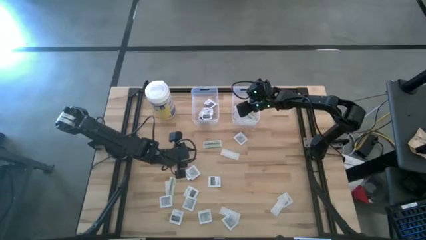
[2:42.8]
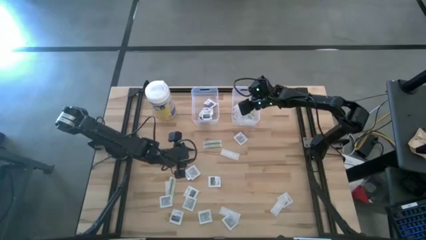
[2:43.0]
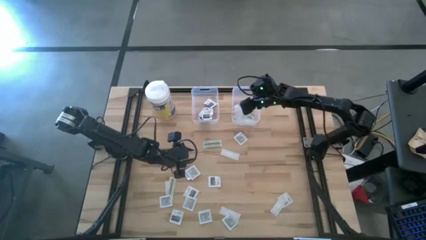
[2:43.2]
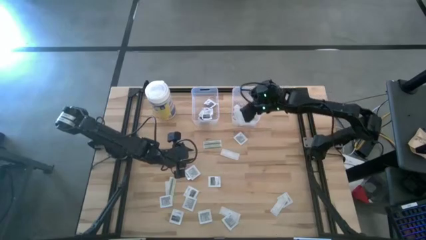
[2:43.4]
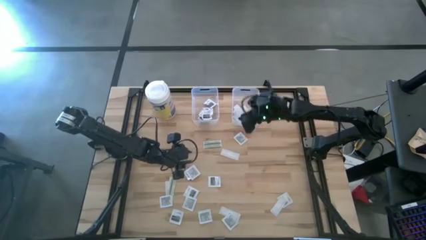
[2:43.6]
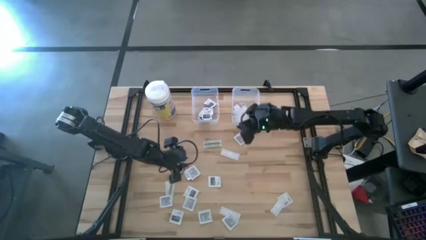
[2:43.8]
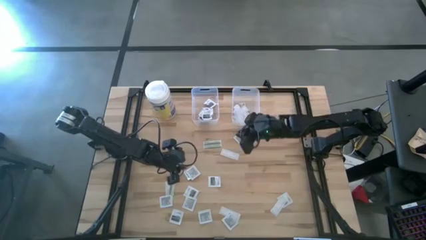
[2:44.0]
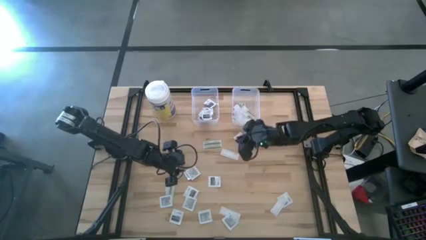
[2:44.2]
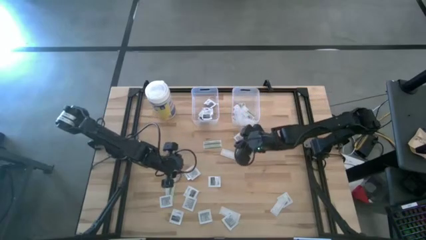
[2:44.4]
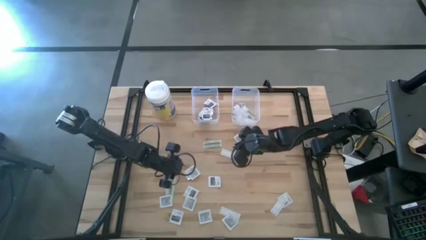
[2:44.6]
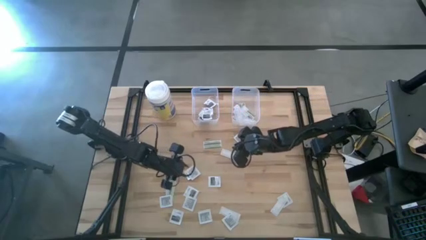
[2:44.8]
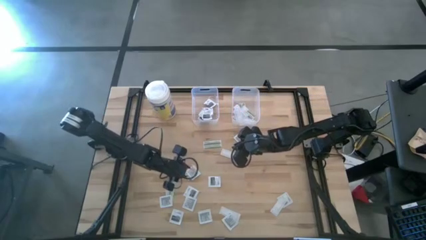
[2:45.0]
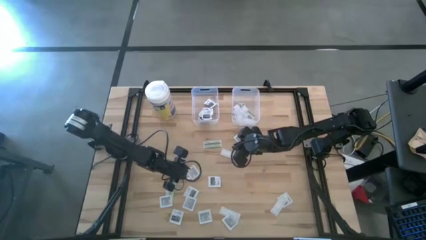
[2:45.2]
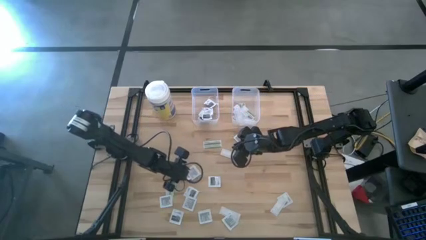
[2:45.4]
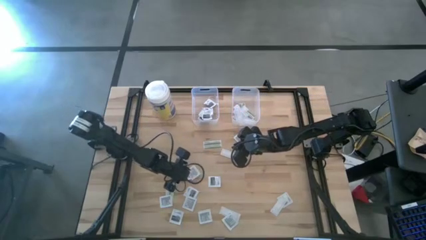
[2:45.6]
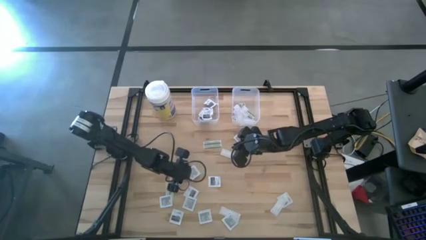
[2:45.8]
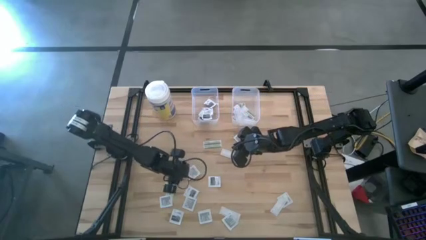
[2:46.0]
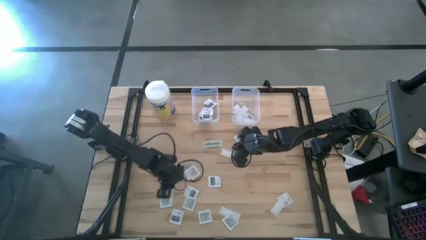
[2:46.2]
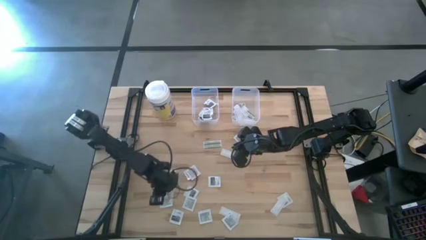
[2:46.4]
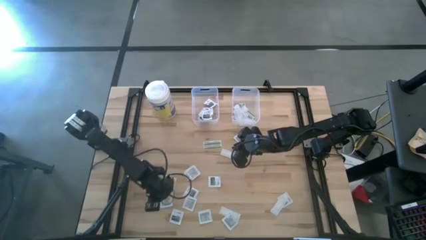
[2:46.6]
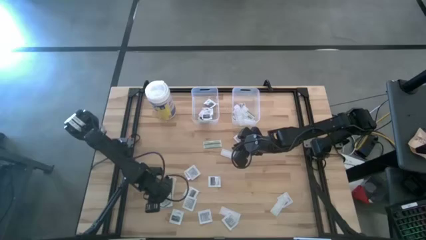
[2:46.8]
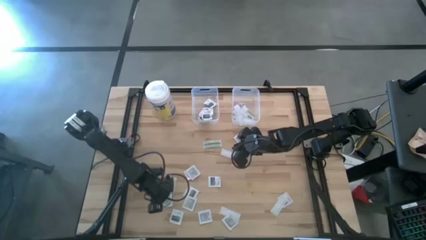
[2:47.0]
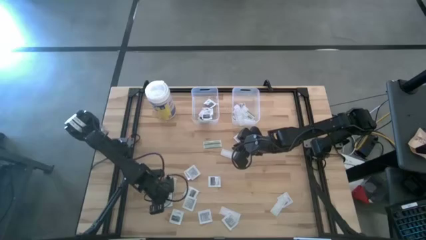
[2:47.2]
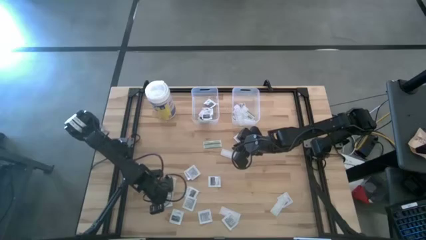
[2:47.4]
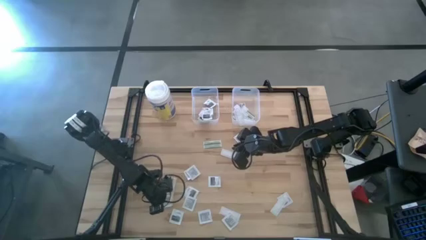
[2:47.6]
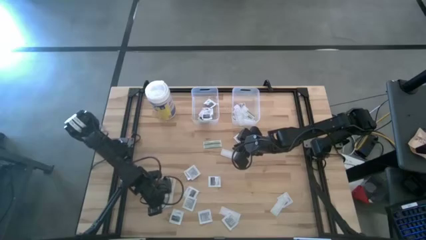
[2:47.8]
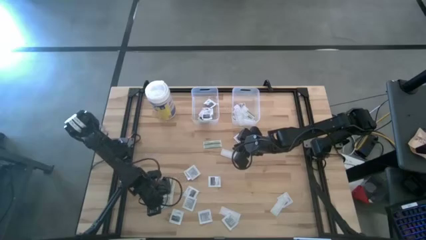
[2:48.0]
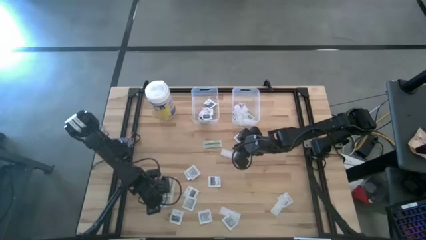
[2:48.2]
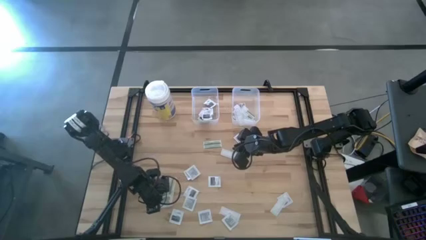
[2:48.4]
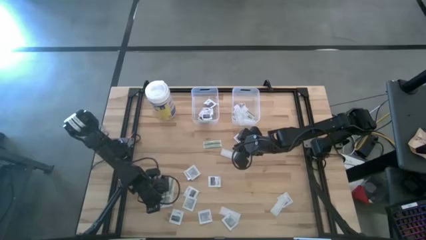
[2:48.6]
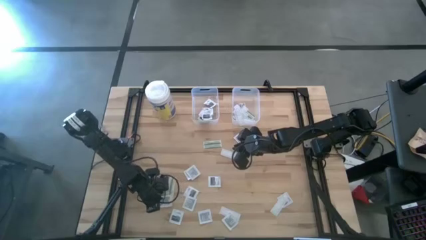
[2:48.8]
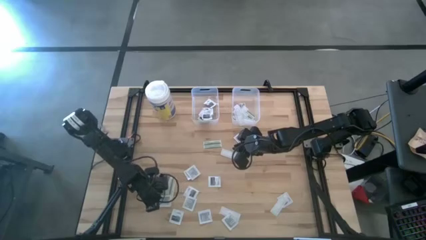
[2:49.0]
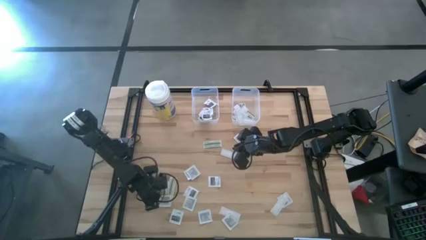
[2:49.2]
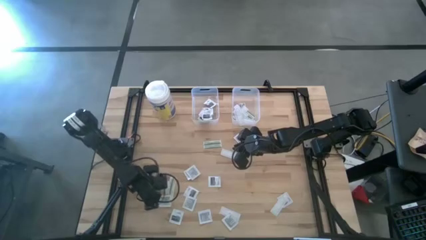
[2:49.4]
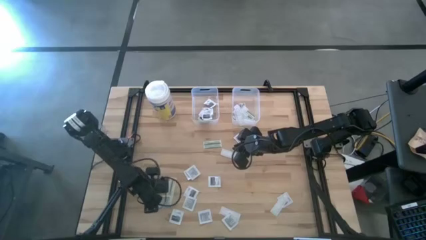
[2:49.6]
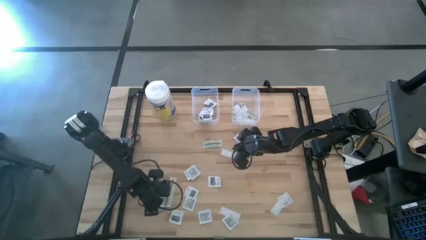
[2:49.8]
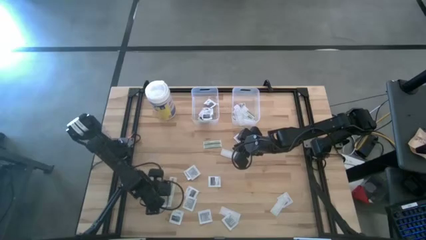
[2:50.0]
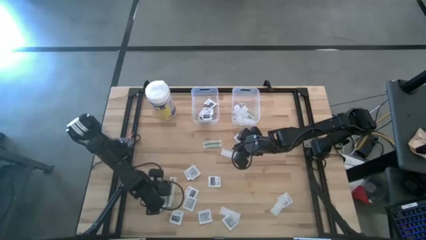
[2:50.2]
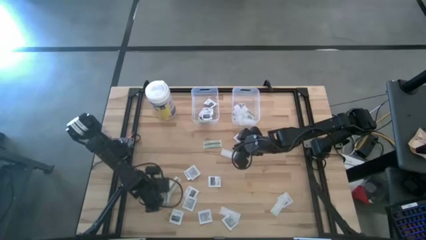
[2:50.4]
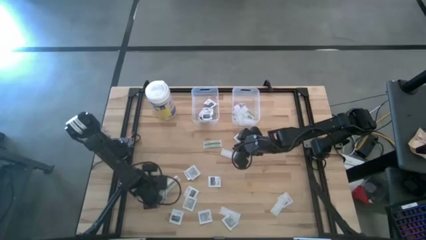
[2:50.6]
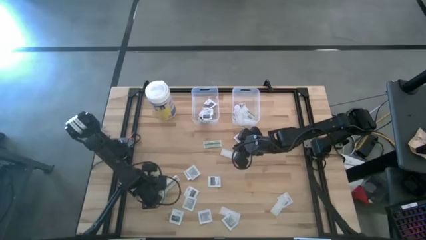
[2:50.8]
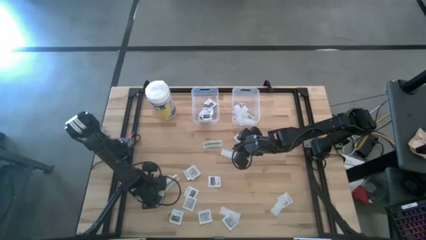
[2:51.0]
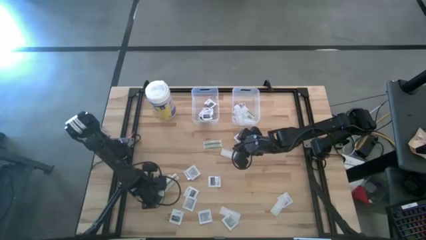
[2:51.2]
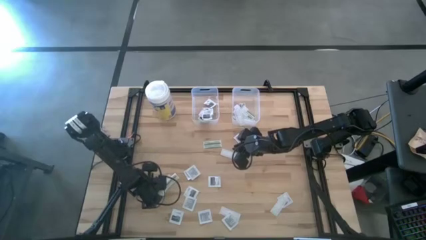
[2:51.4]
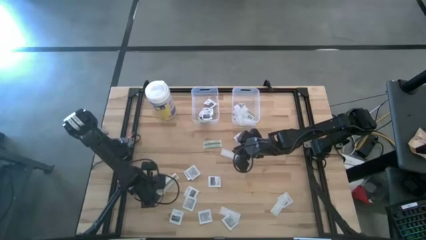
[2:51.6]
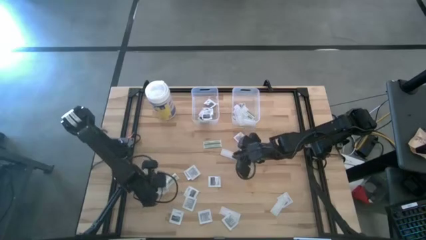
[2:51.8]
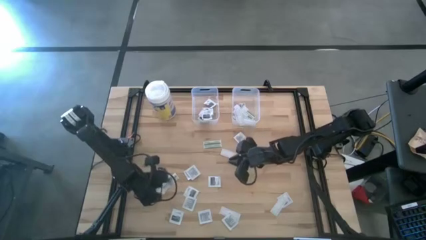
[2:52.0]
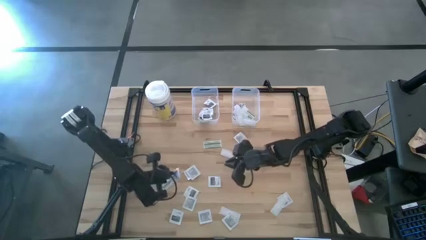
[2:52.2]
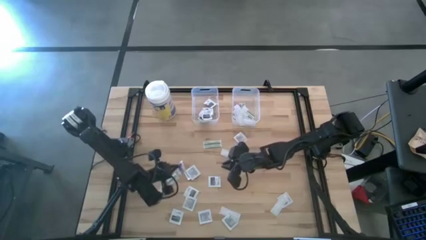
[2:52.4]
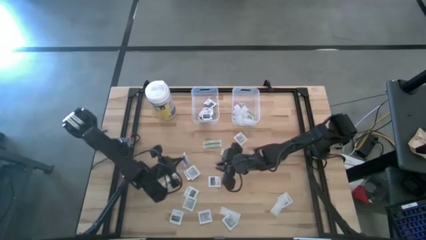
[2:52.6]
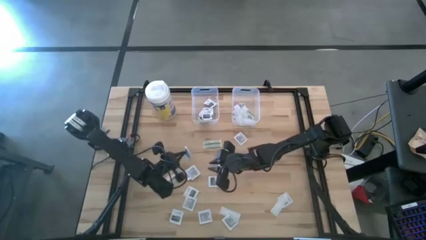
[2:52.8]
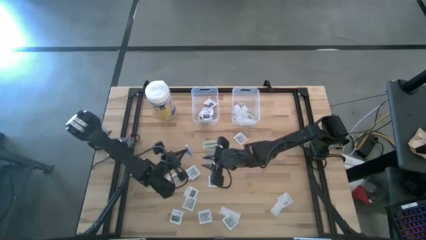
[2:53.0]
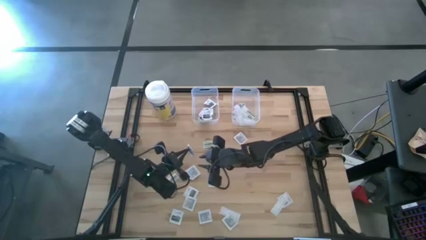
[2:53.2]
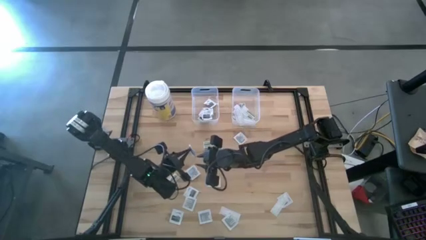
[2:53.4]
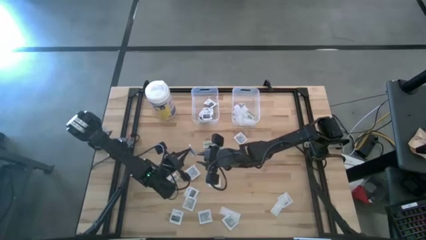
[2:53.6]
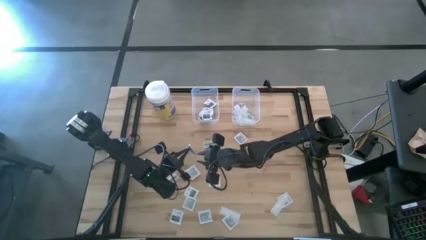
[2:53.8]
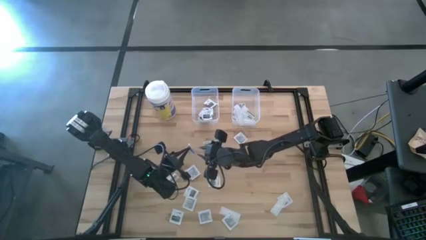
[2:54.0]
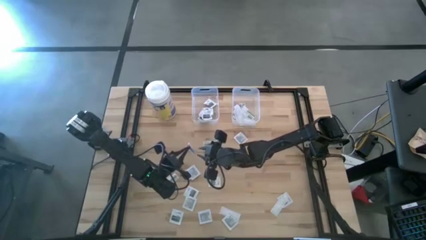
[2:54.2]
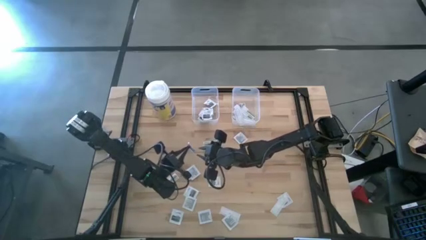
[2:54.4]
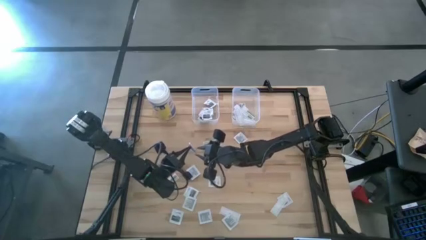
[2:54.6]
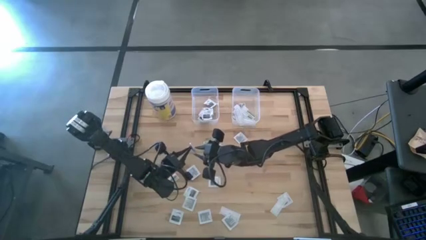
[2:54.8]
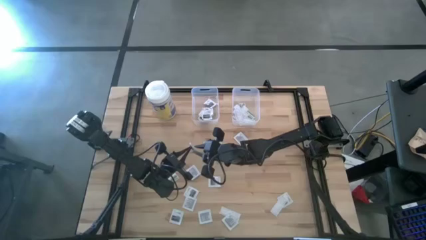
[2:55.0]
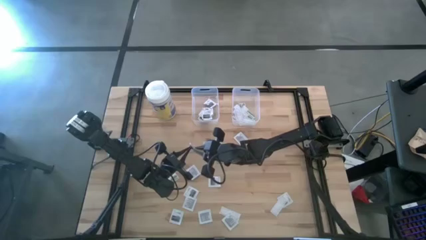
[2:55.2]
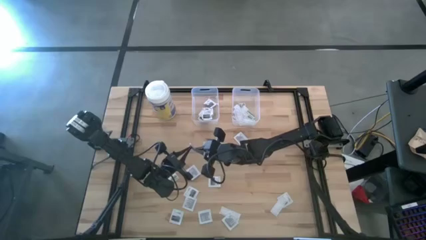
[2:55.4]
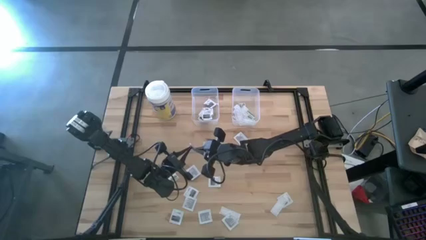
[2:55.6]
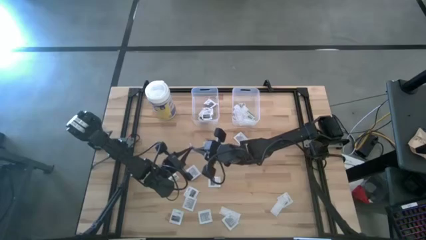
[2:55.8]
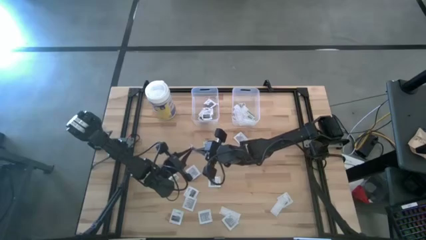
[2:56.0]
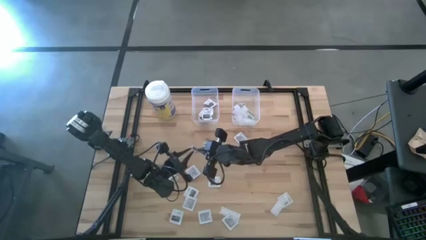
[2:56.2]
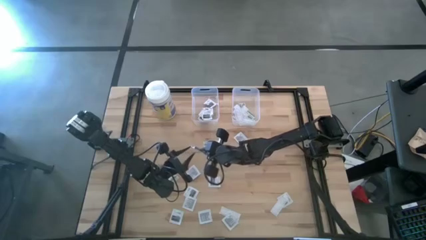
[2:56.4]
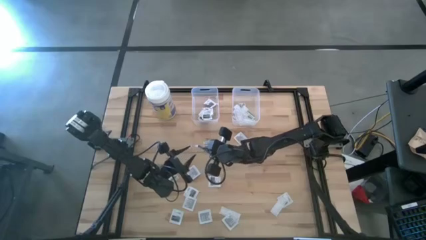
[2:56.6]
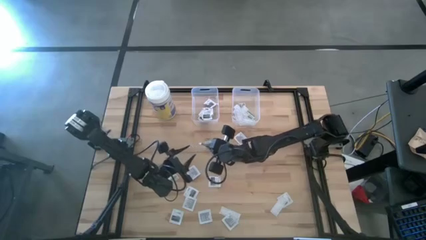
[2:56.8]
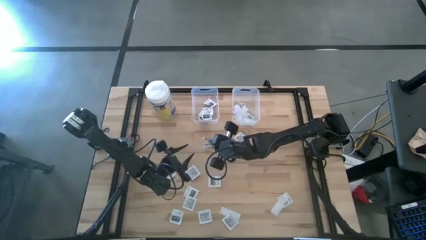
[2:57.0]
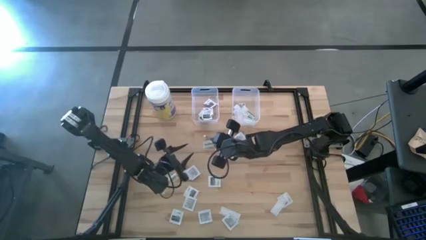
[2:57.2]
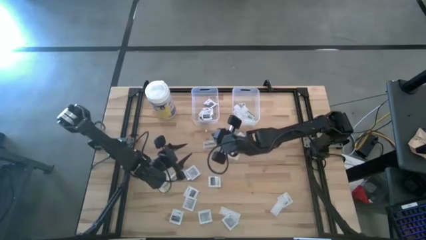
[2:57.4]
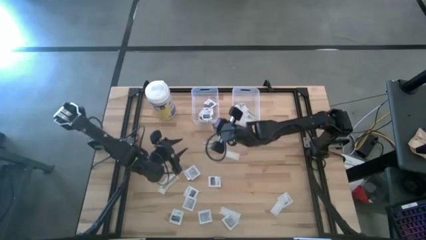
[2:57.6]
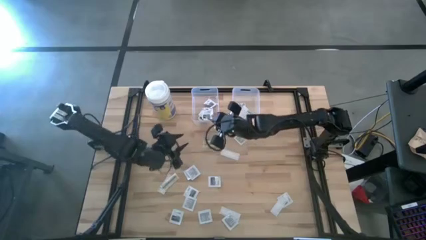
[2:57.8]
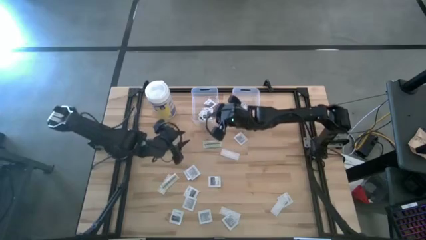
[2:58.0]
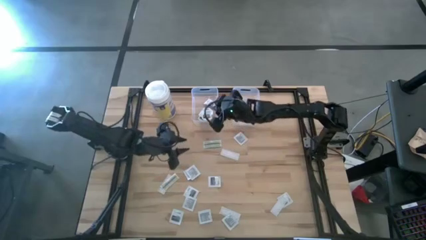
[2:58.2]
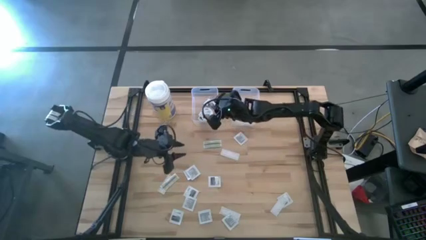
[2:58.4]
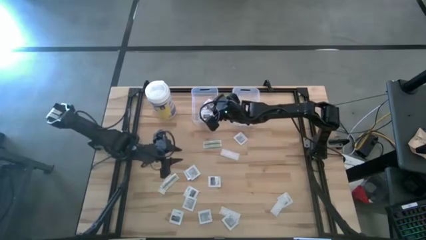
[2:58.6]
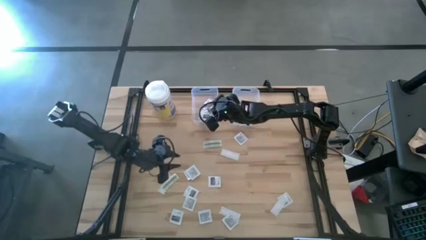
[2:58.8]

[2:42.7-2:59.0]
Task: Pick & Place First Aid Supplies
Put the towelette pack into the left transparent bin
